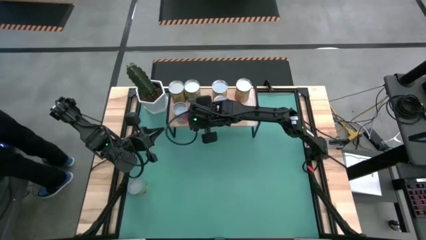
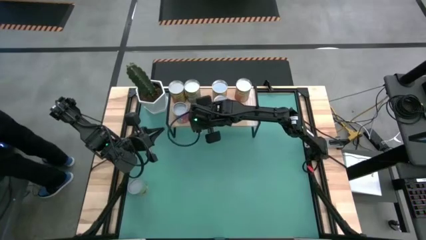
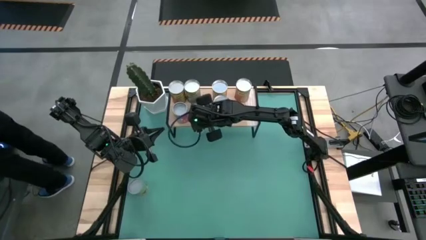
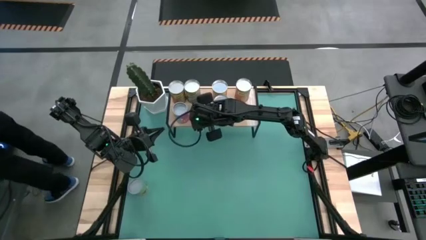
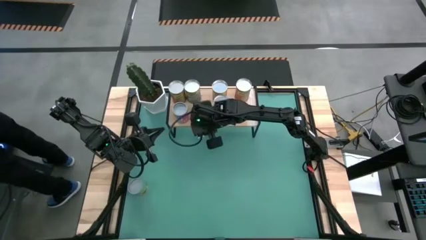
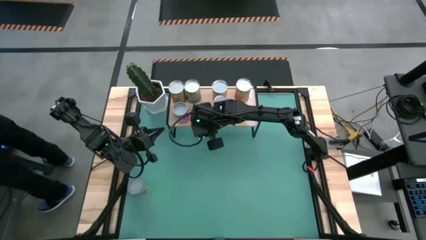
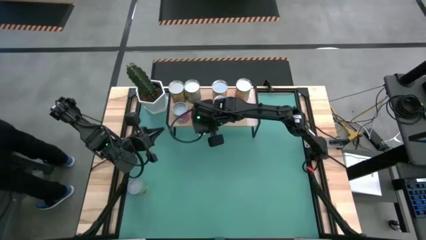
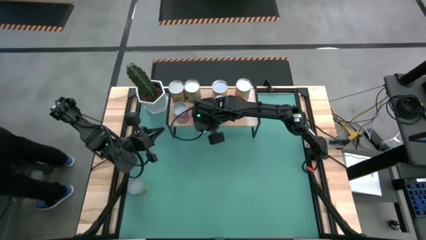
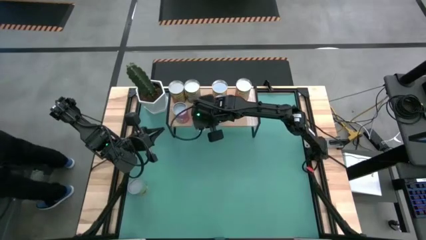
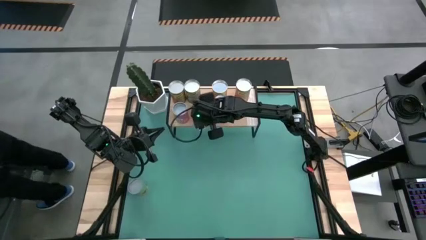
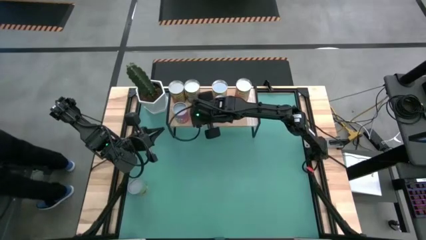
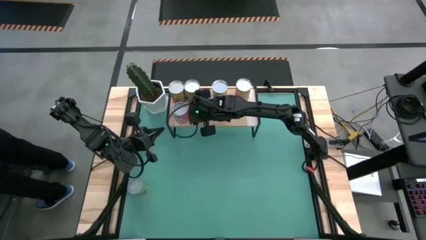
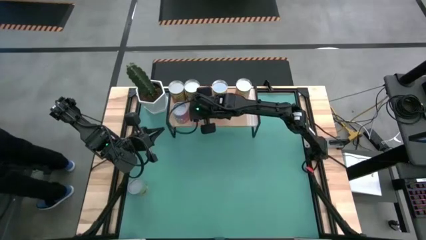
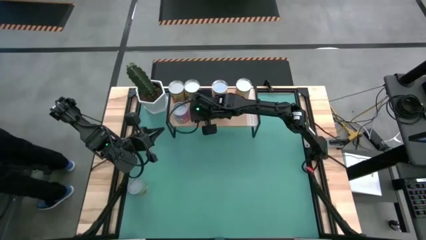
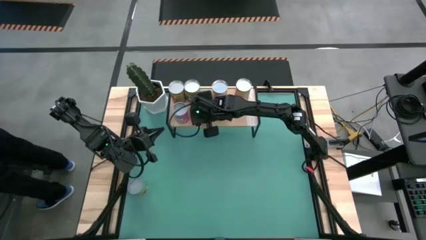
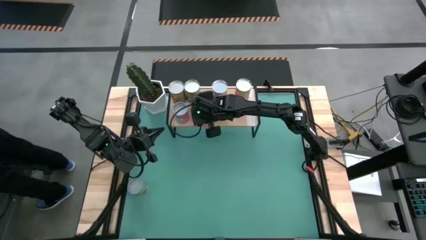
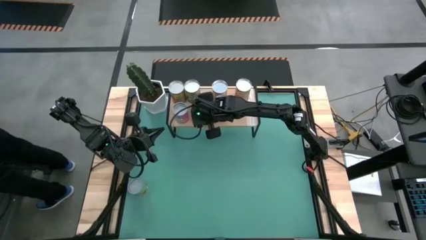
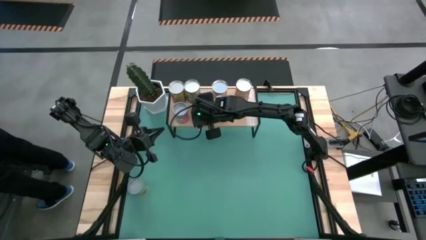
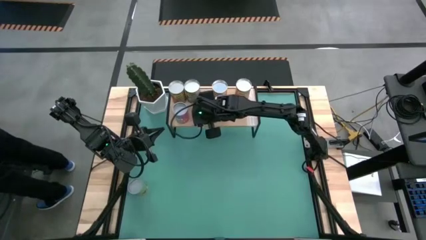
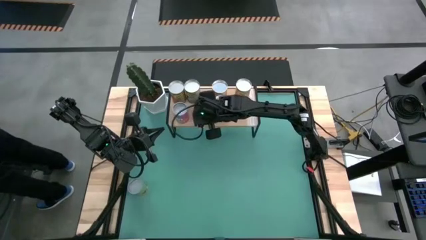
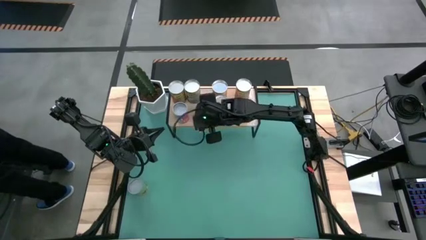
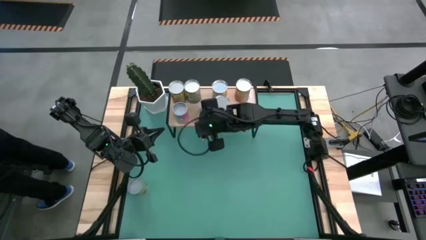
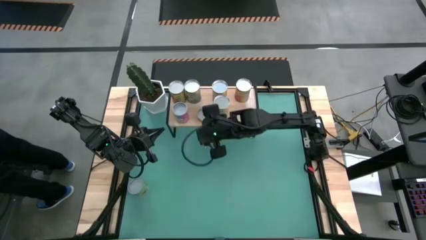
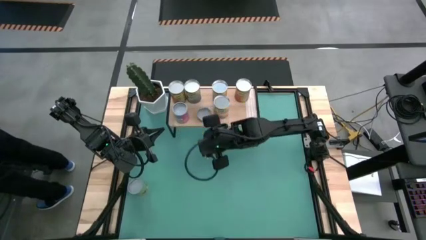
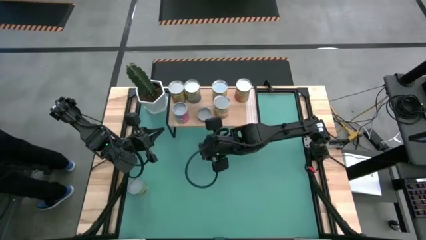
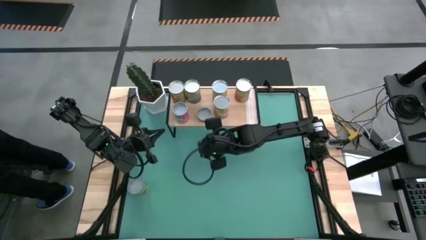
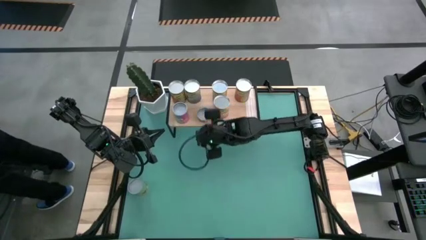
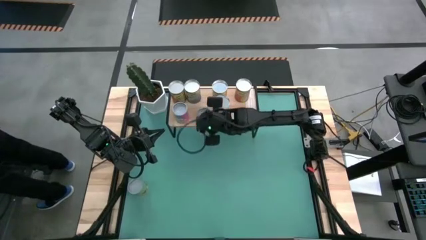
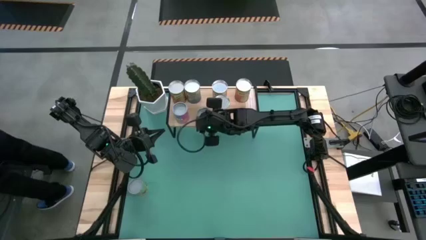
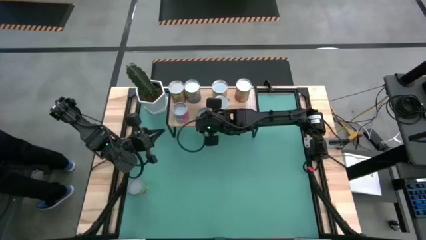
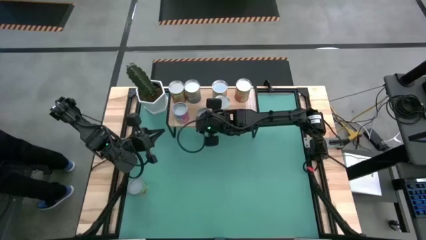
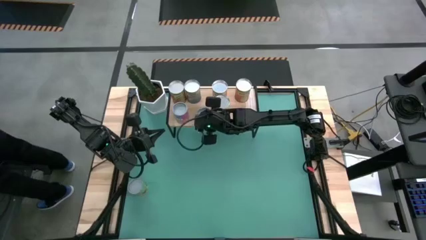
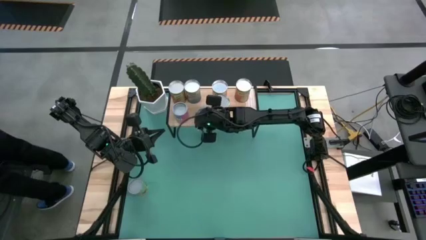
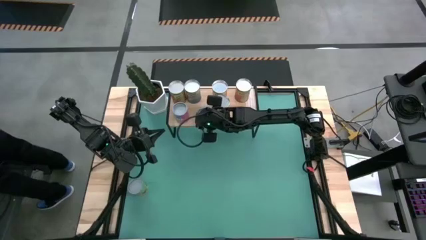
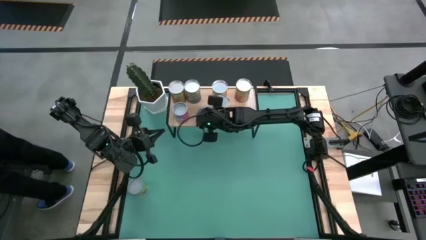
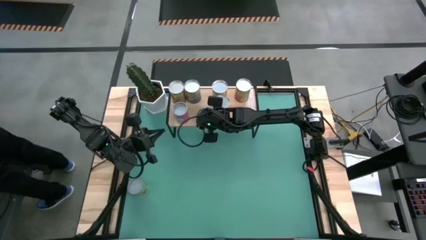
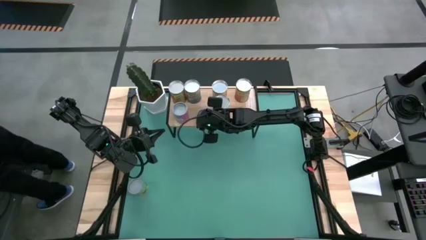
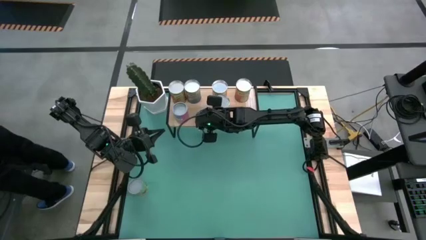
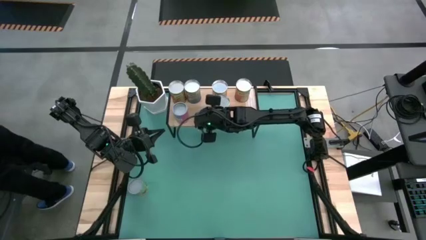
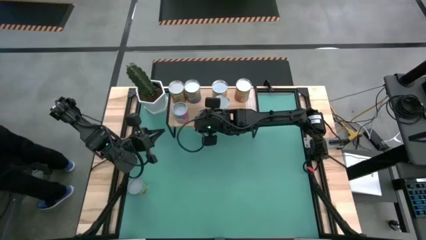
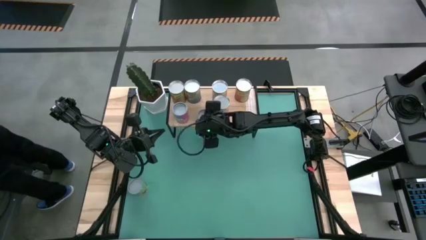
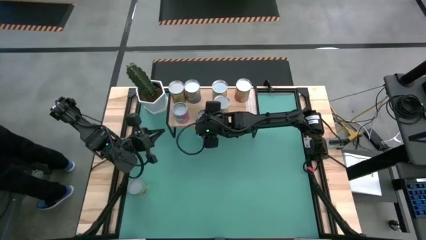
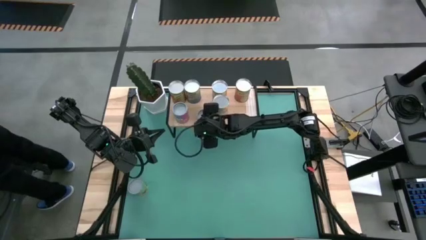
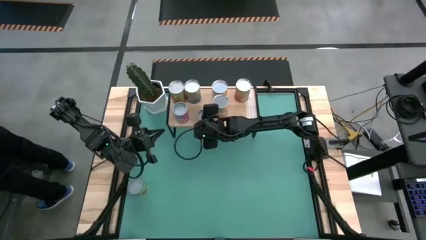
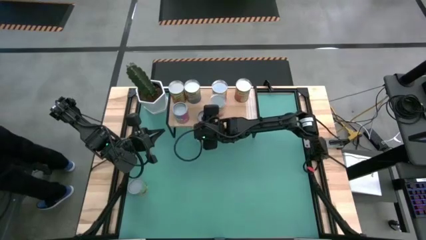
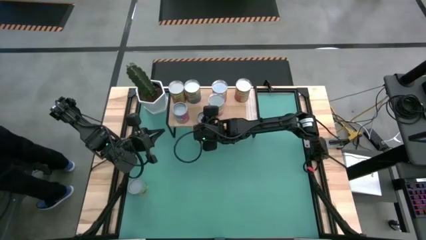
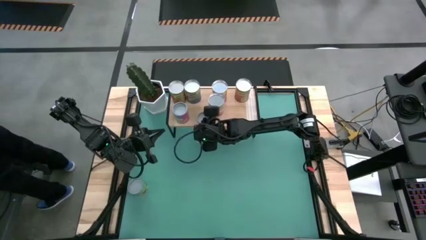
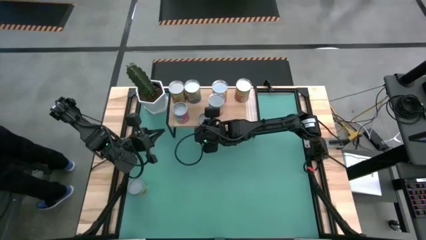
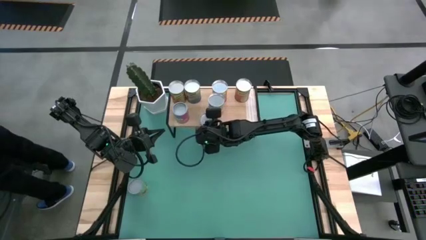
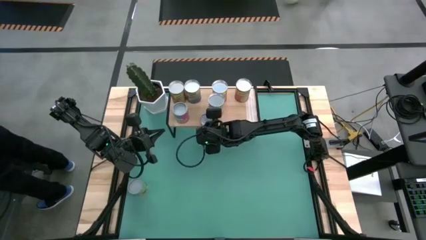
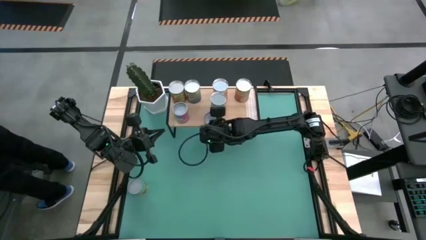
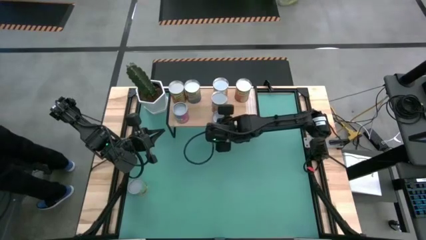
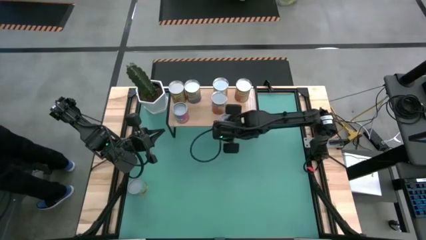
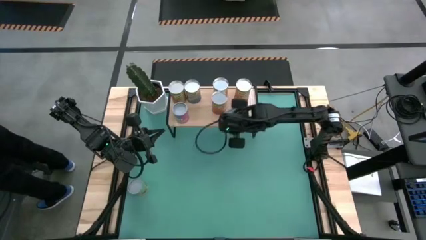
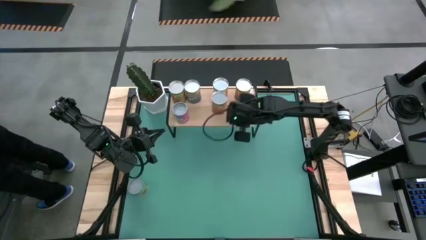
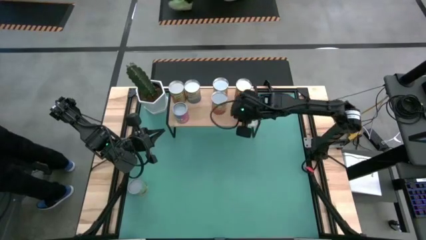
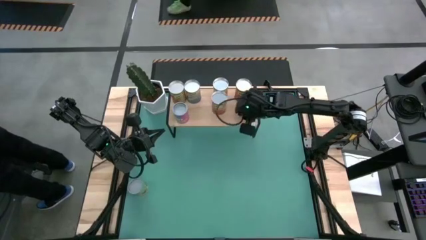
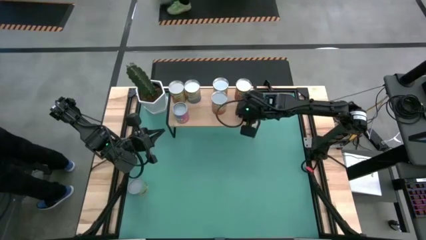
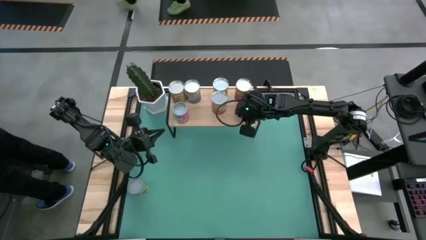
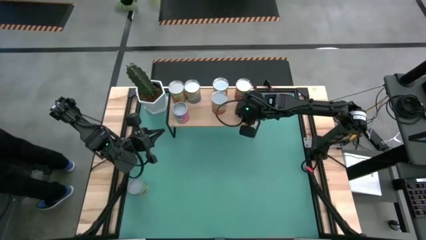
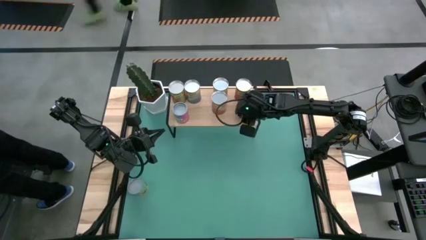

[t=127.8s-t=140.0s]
Task: Pick and place cans onto a shelf
Put the canned pineapple rings on the shelf

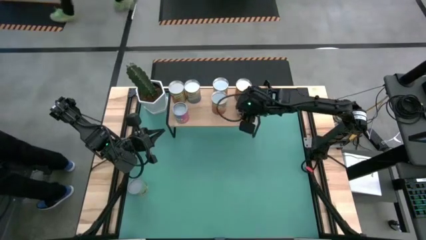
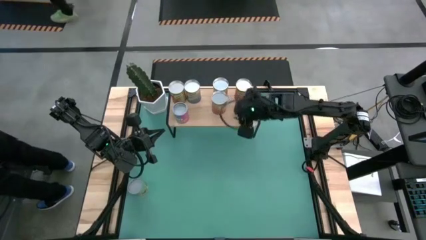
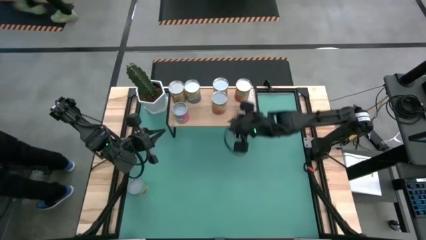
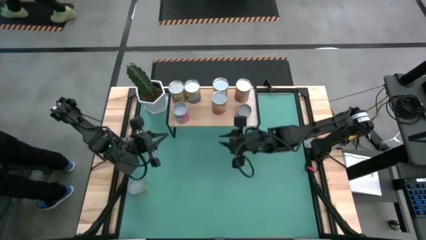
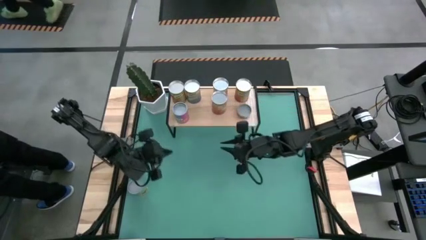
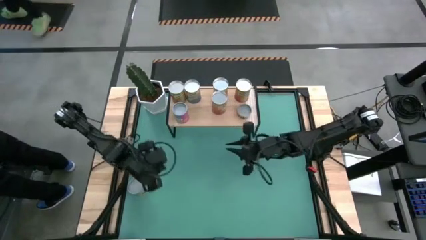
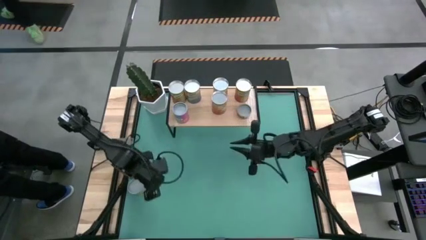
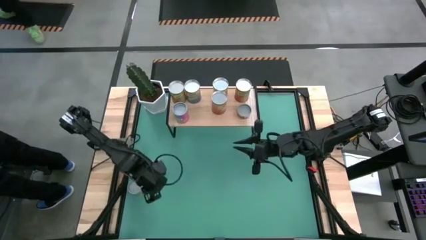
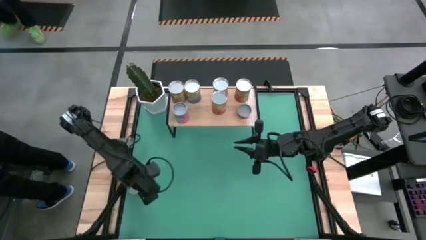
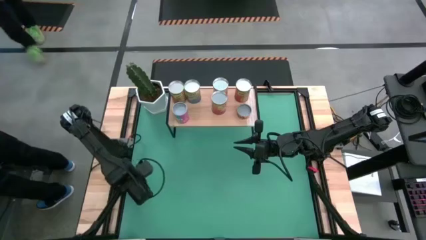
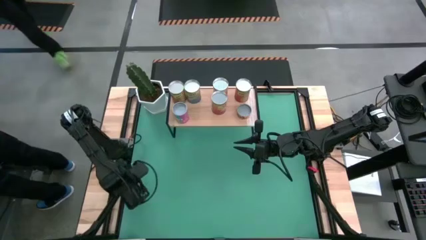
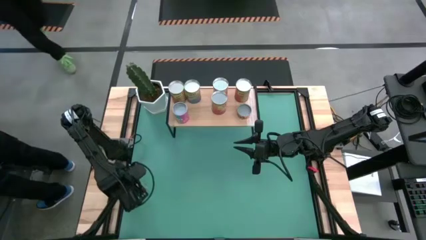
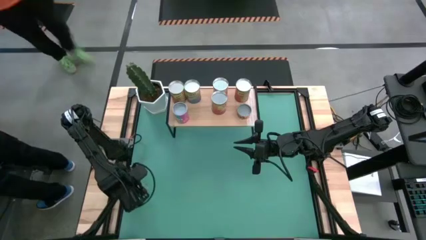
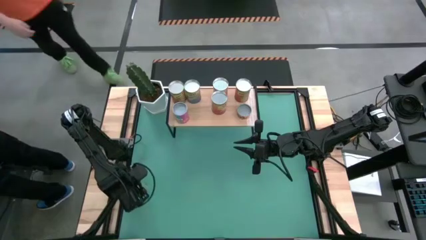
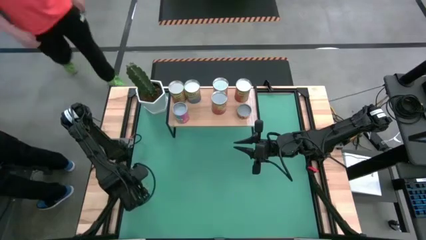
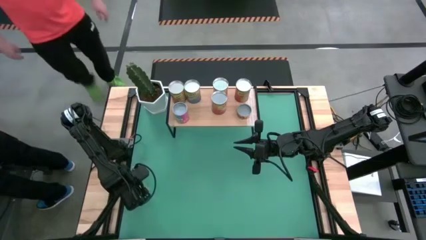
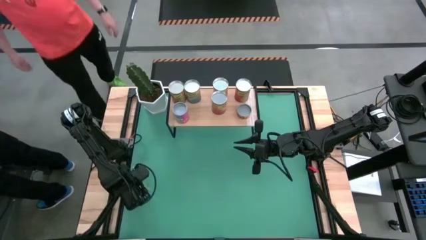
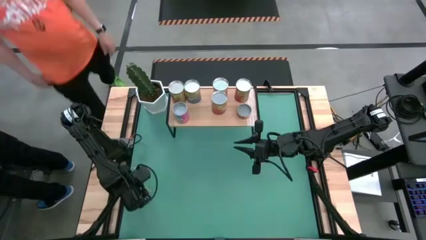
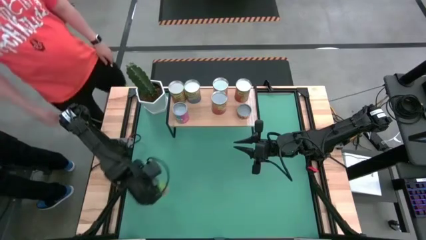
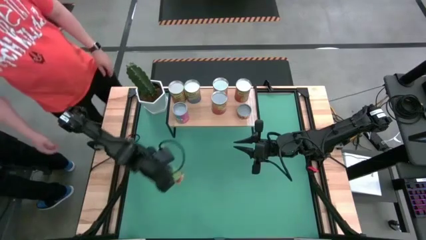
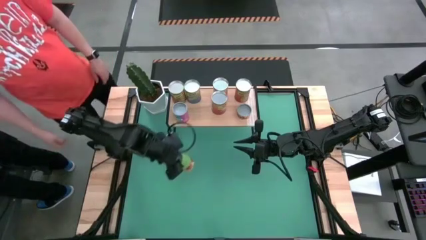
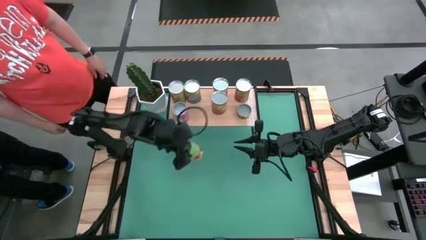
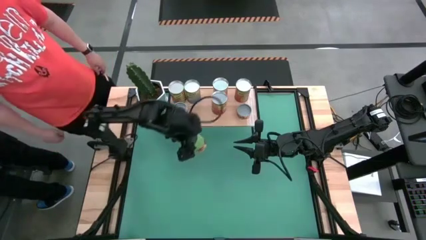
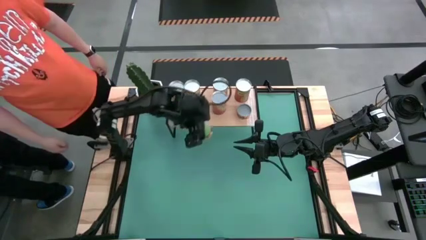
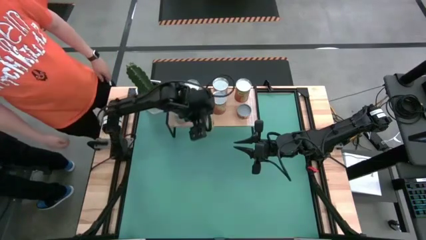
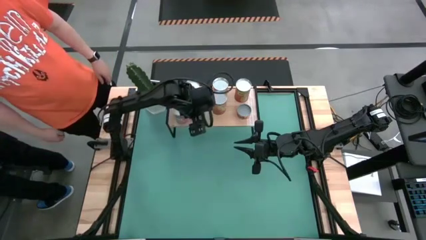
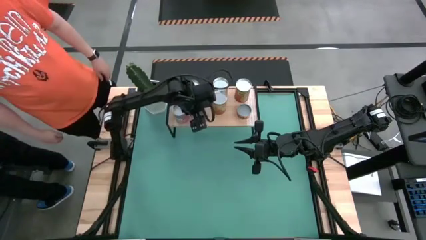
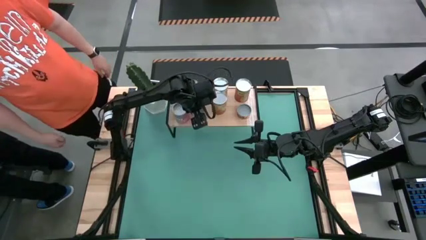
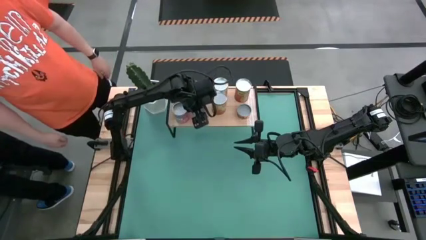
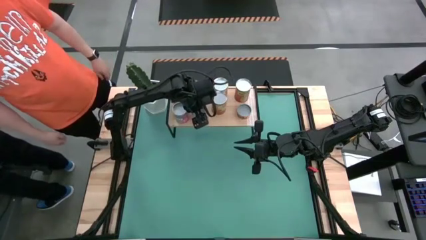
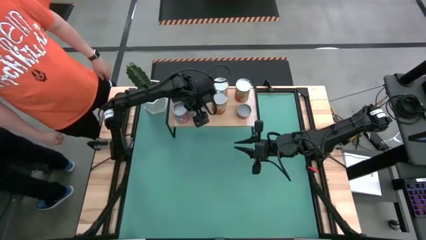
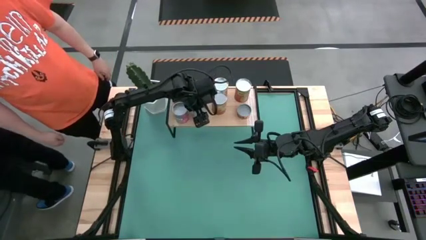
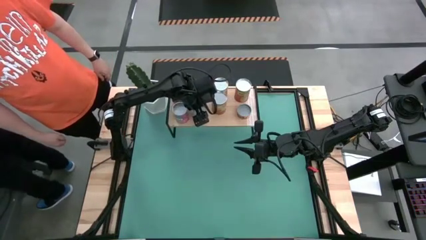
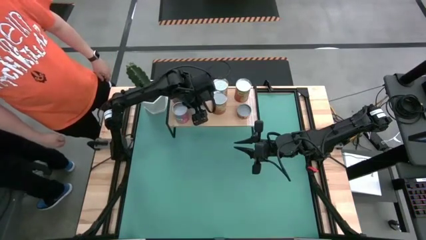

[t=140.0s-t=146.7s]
Put the canned spaghetti sauce on the shelf
